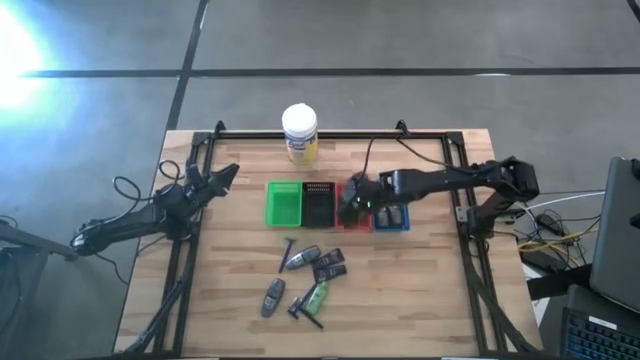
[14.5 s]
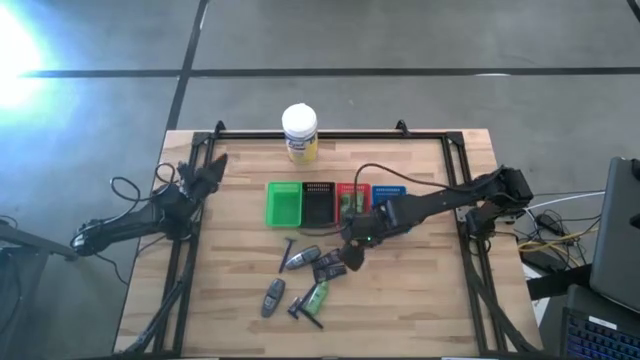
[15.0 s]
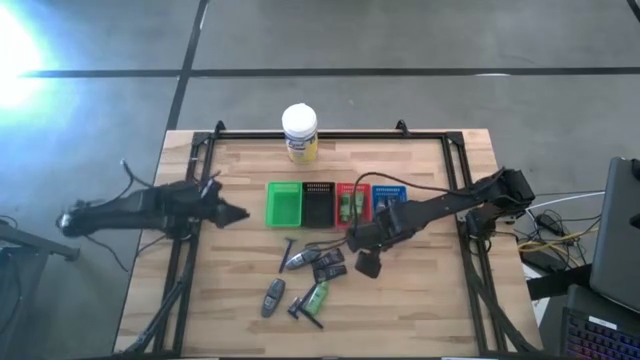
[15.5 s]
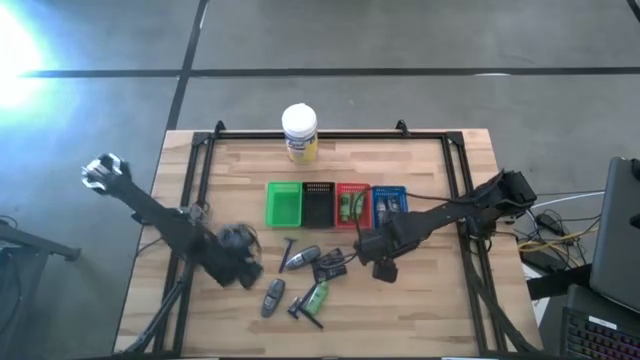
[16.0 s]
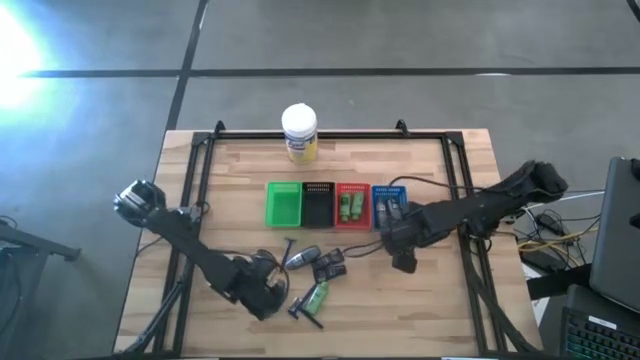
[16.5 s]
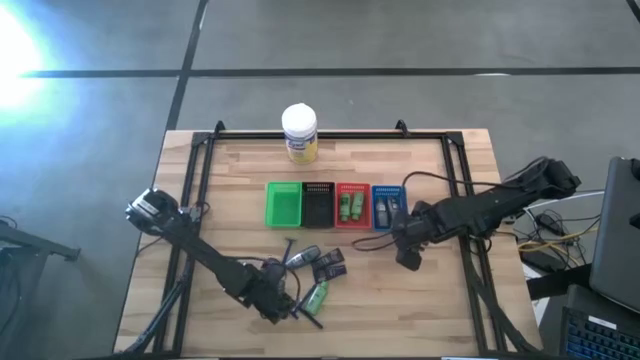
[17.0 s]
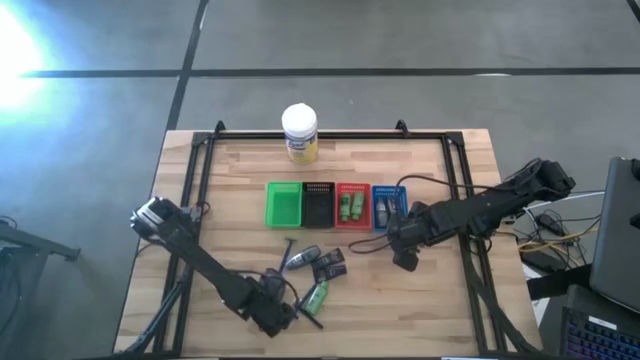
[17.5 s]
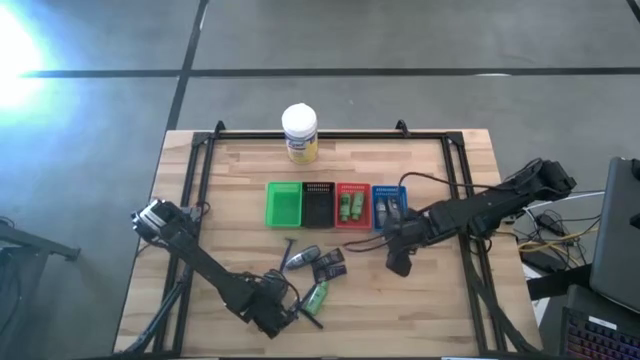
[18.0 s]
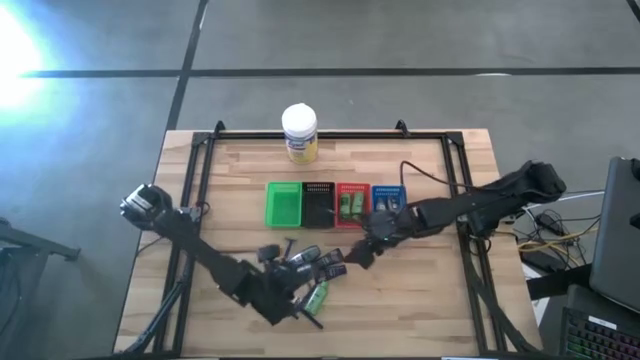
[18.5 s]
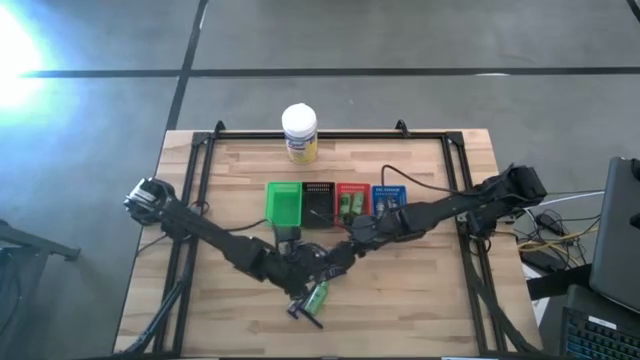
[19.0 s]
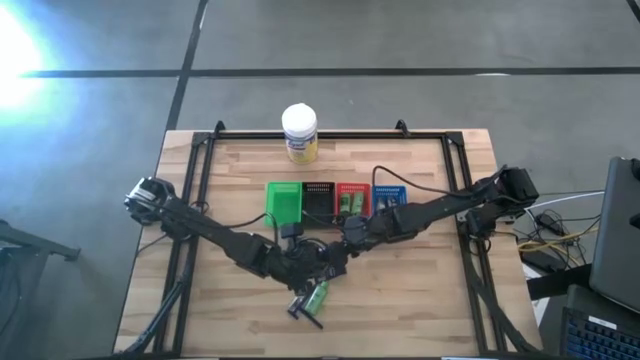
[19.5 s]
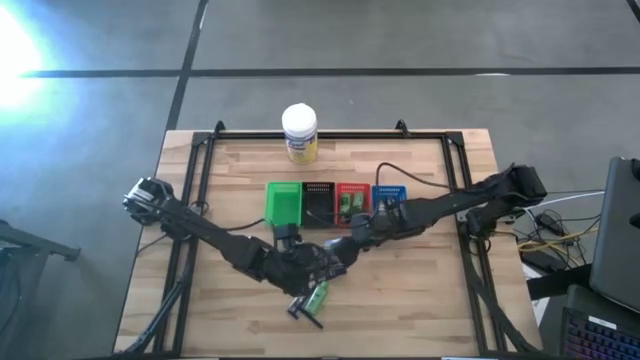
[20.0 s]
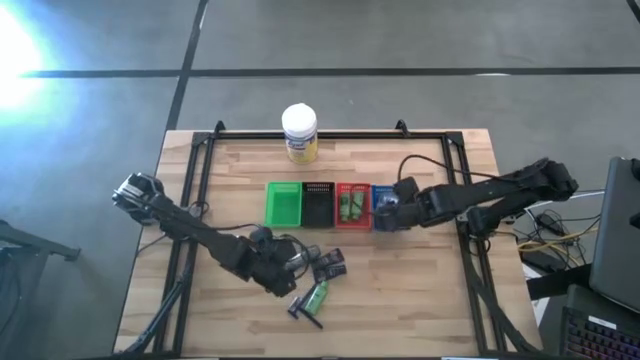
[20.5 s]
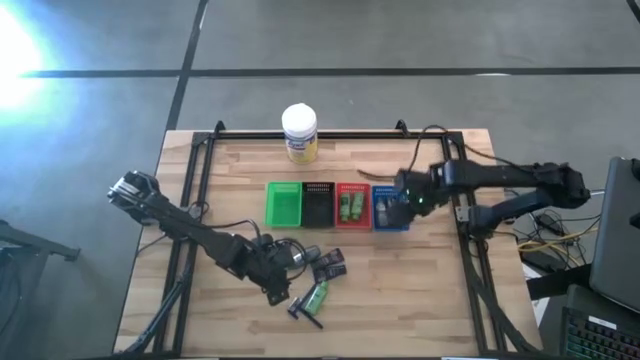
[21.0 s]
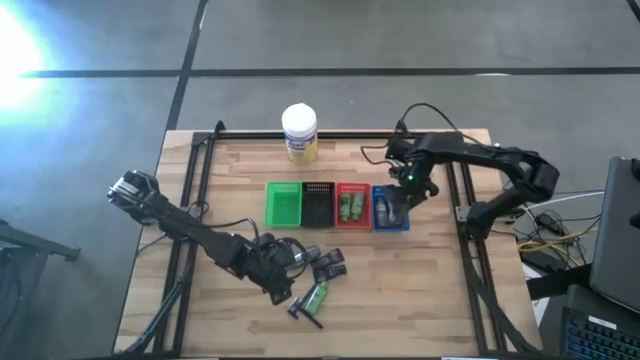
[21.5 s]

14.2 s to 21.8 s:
Task: Pick & Place Travel size toiletries
Put the gray deodorant into the blue bin

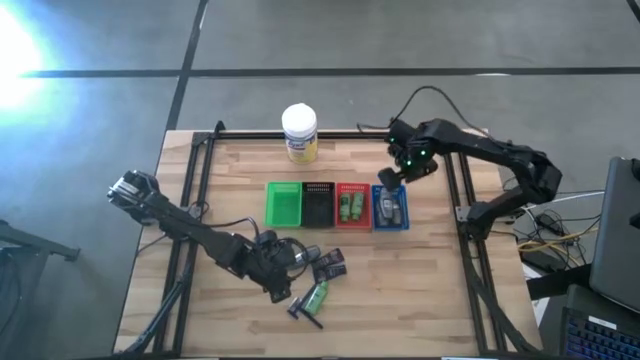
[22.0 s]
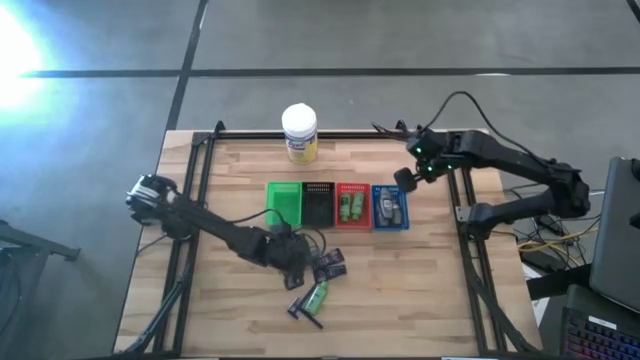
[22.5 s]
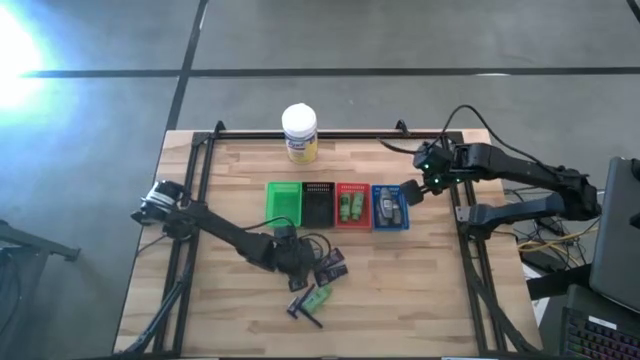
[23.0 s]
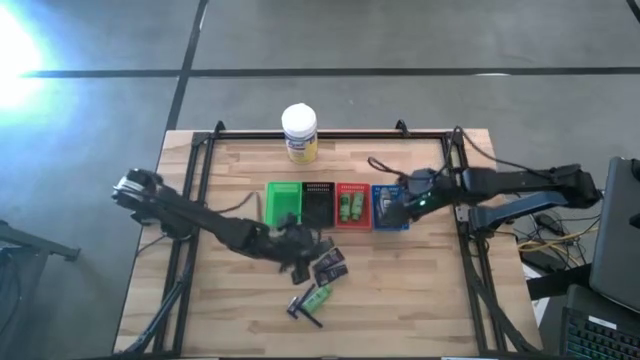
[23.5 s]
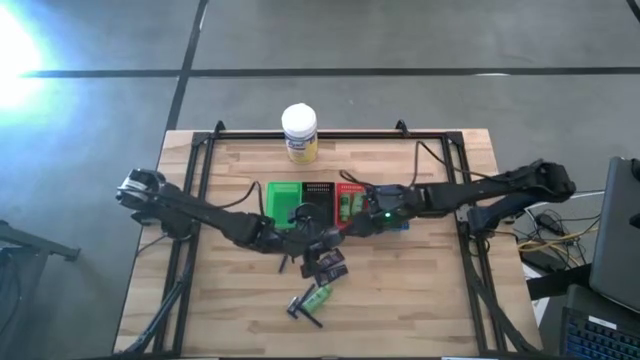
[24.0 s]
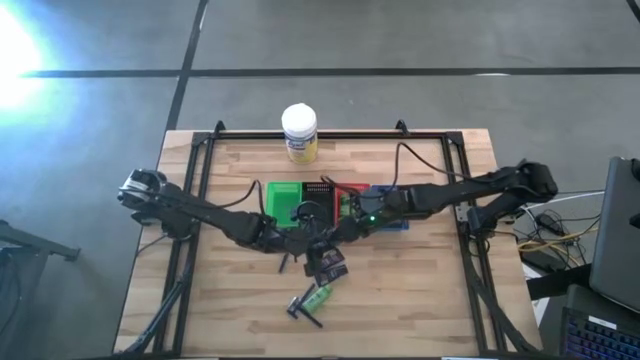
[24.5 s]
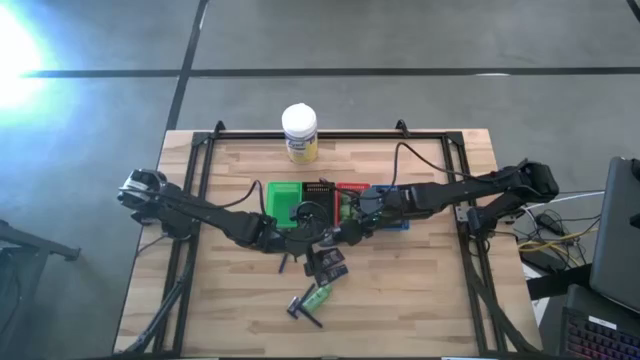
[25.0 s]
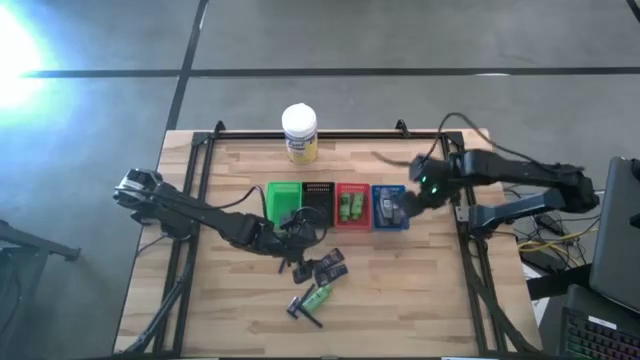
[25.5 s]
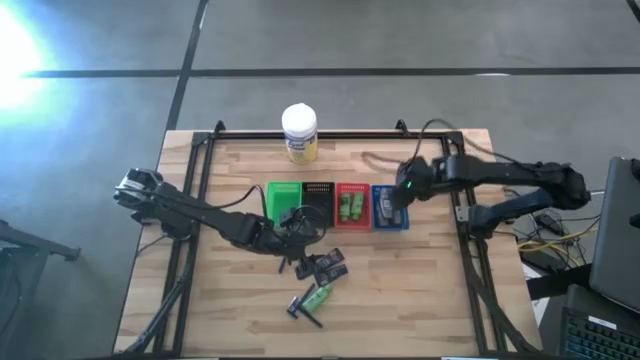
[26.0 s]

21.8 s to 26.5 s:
Put the gray deodorant into the blue bin

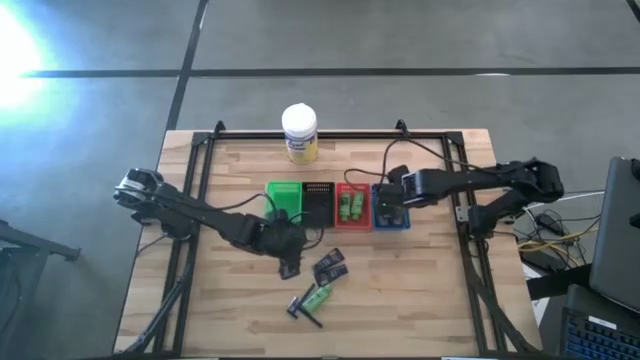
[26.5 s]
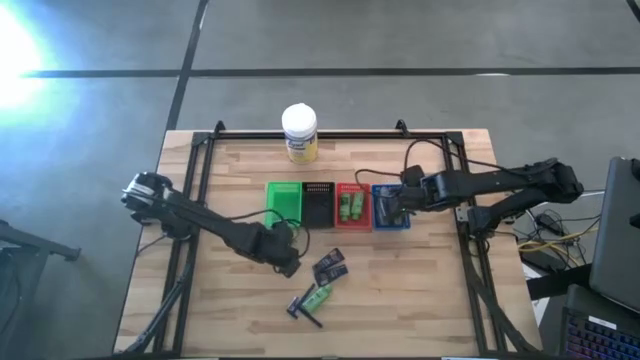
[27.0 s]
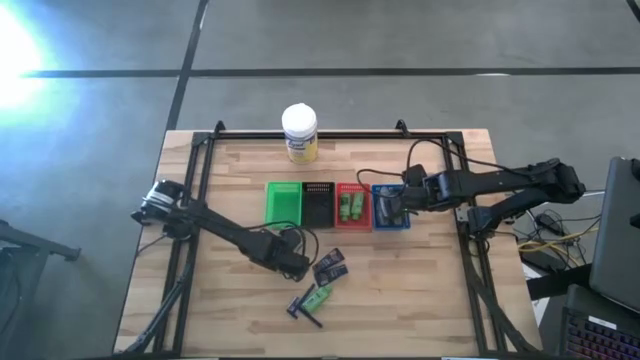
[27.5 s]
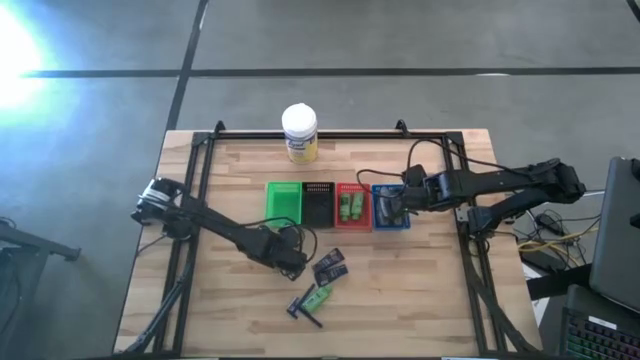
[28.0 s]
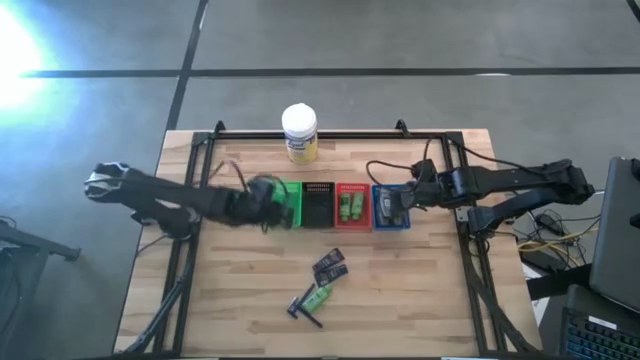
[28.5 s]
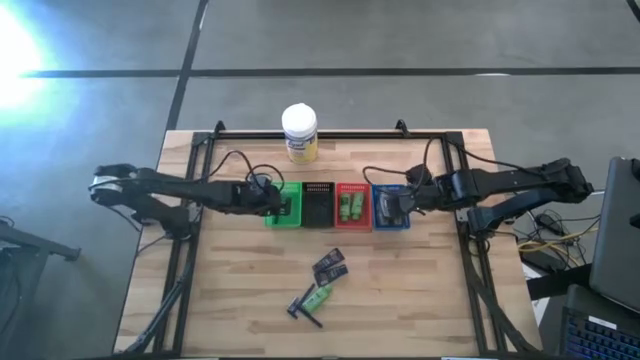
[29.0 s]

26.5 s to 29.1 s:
Put the blue razor into the green bin

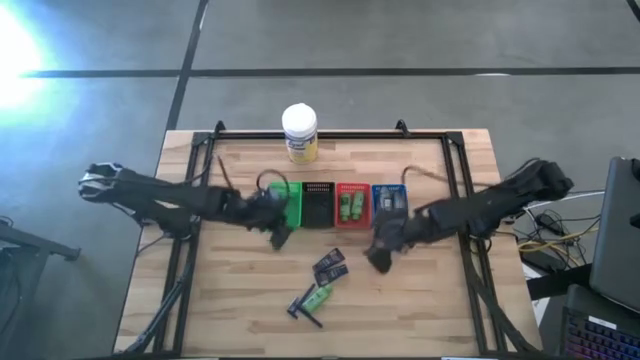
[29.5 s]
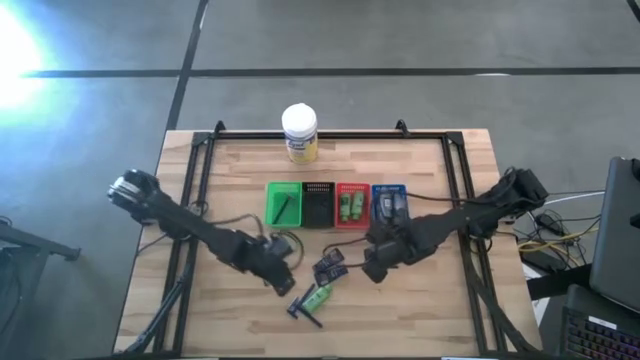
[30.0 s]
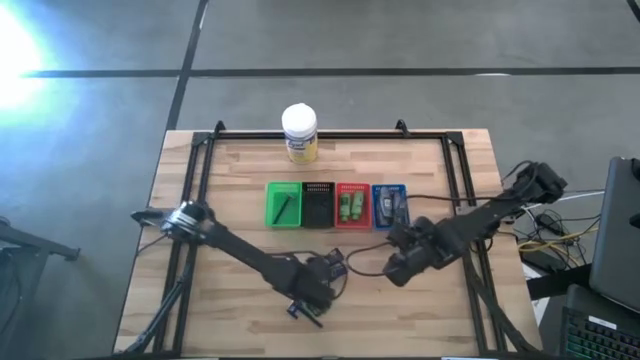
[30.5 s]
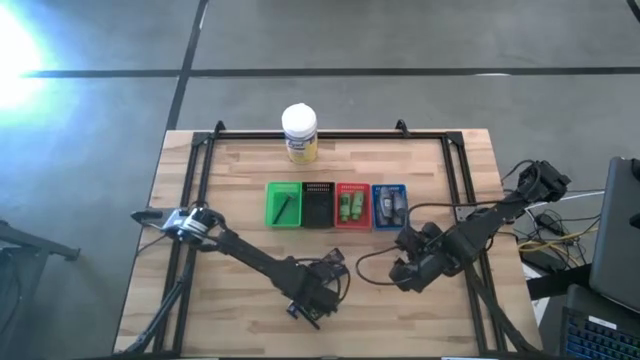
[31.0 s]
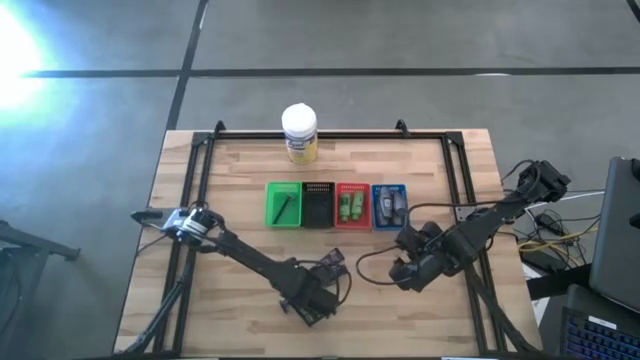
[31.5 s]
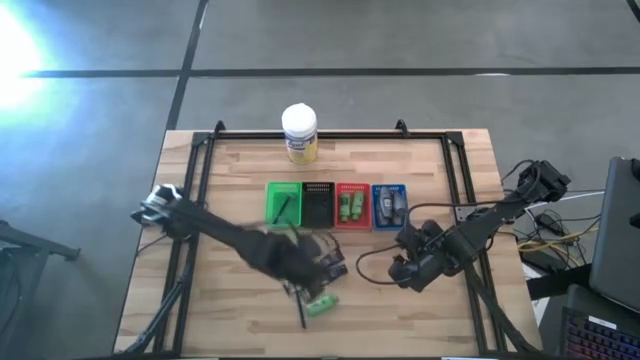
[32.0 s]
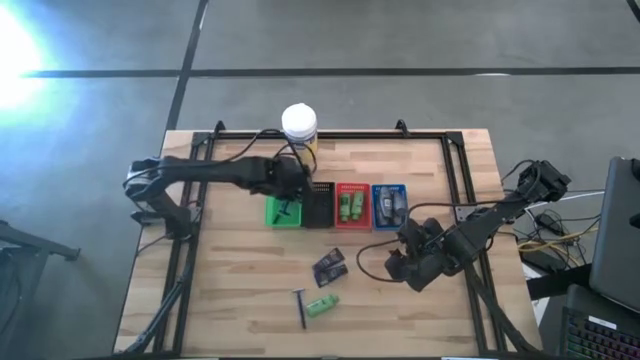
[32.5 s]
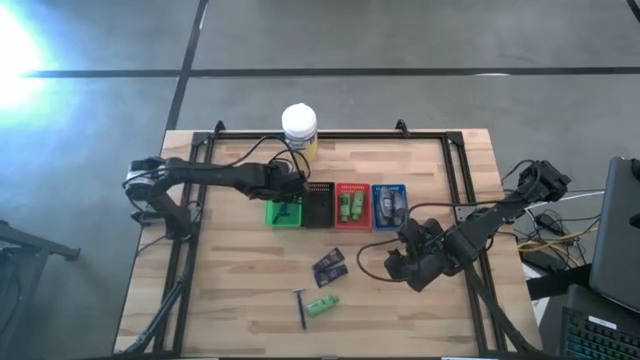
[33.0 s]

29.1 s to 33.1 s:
Put the blue razor into the green bin

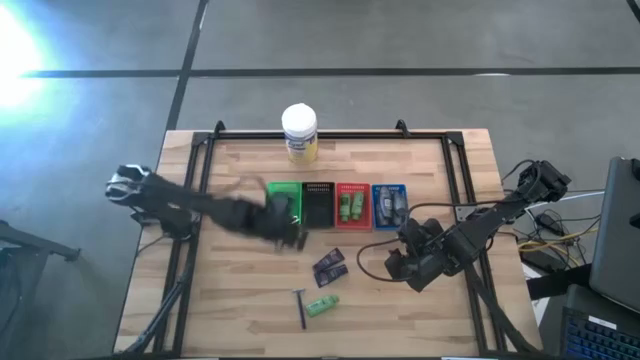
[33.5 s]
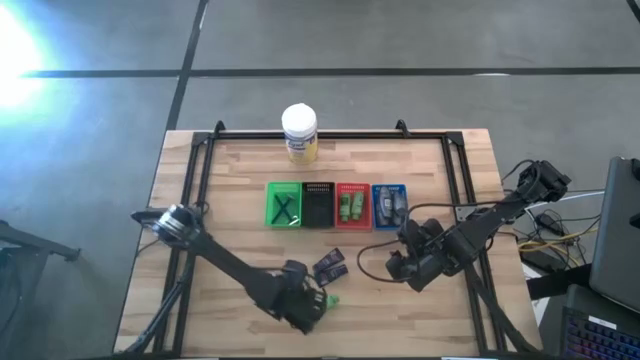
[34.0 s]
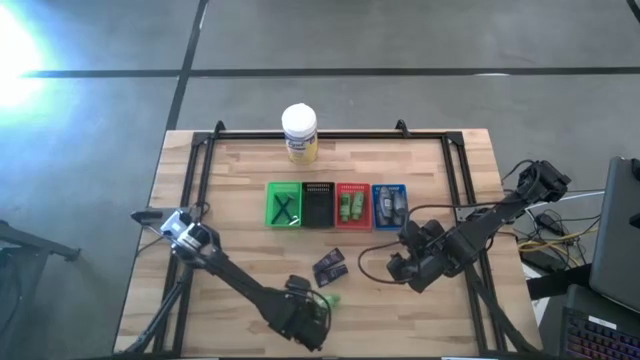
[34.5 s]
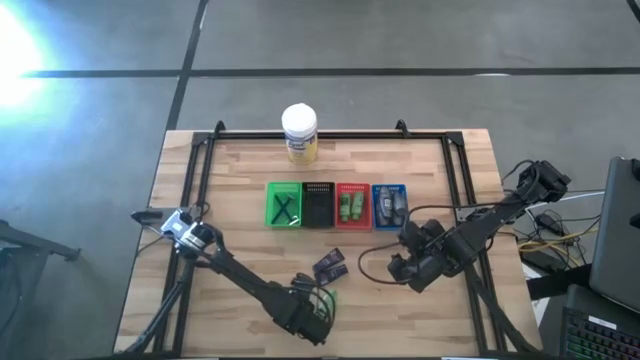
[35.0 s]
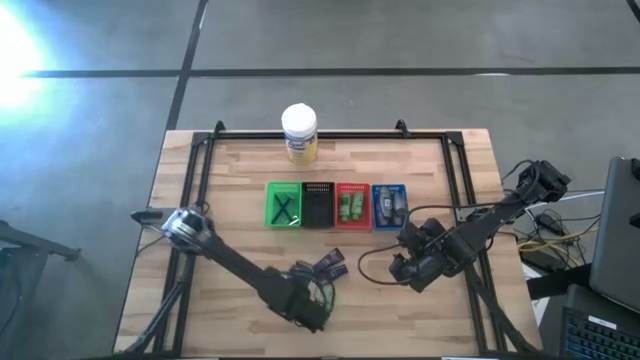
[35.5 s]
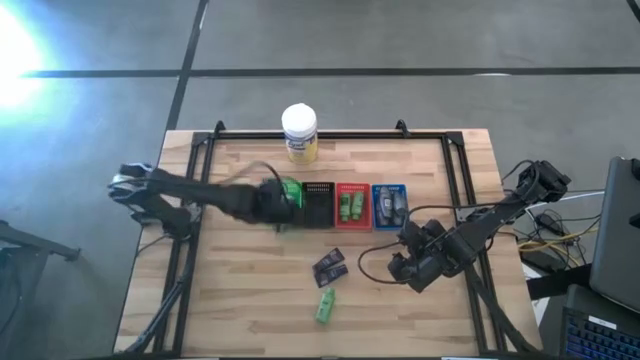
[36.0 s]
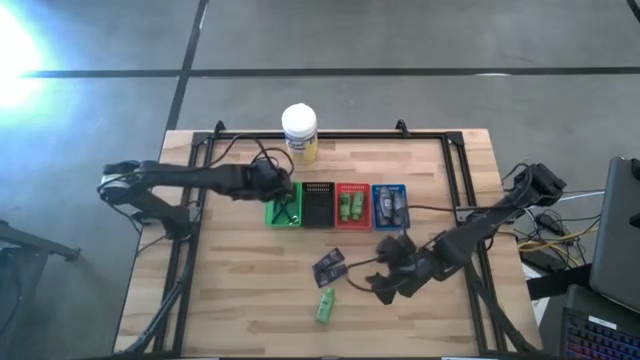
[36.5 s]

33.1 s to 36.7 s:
Put the blue razor into the green bin
